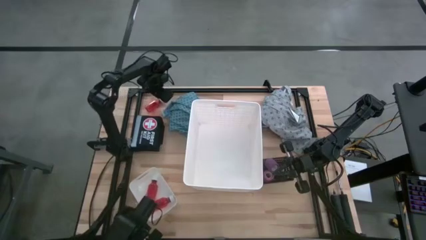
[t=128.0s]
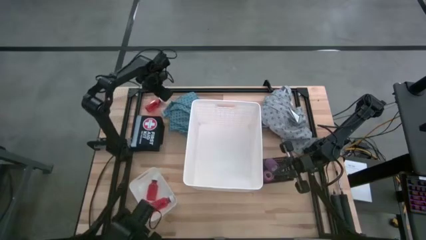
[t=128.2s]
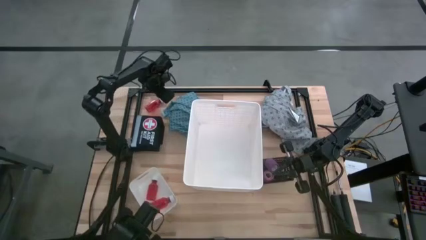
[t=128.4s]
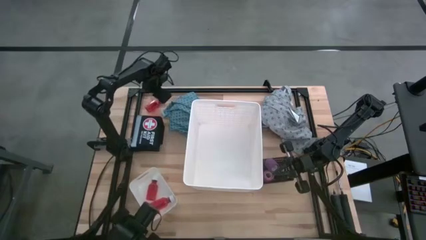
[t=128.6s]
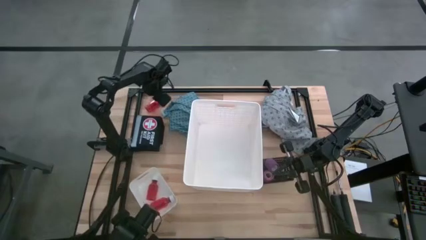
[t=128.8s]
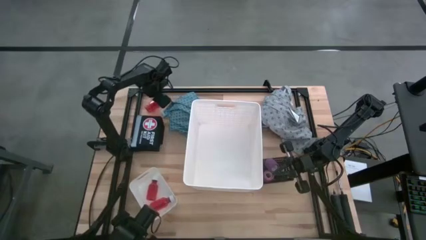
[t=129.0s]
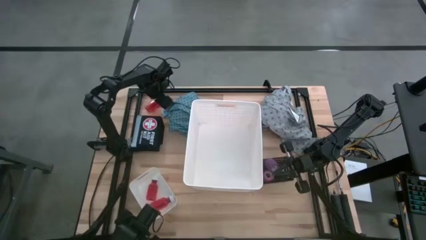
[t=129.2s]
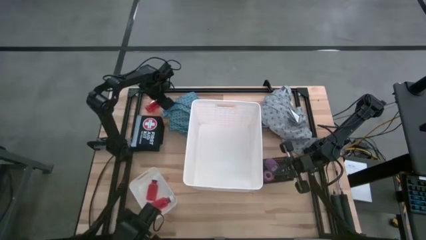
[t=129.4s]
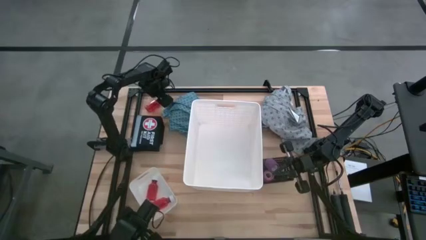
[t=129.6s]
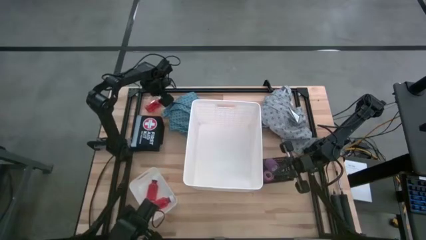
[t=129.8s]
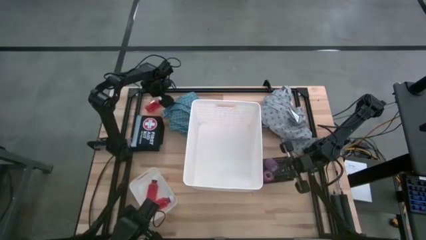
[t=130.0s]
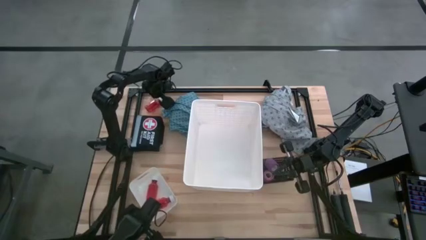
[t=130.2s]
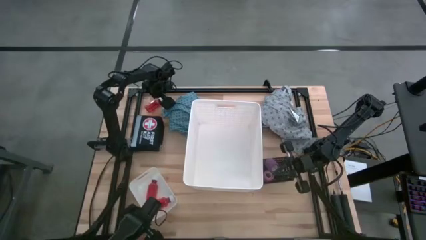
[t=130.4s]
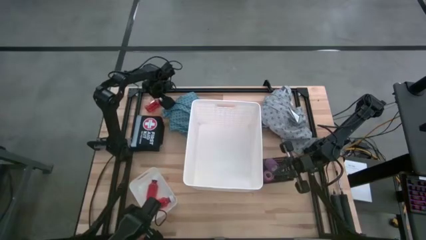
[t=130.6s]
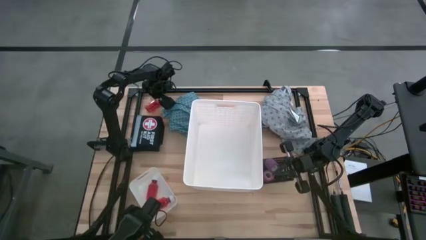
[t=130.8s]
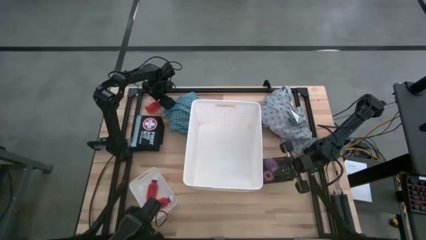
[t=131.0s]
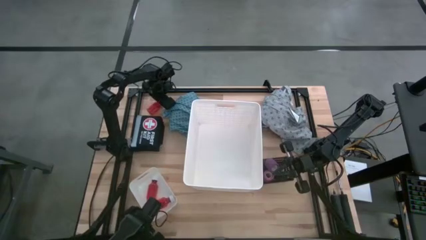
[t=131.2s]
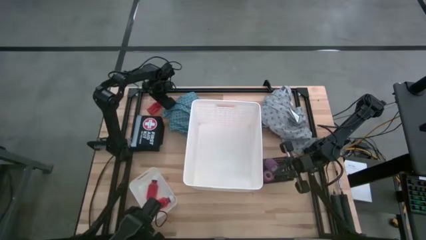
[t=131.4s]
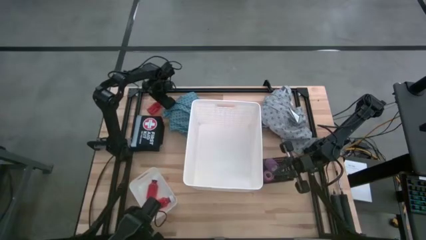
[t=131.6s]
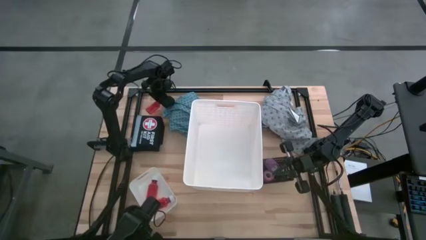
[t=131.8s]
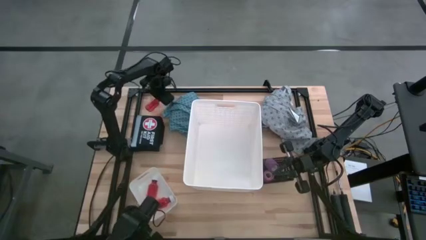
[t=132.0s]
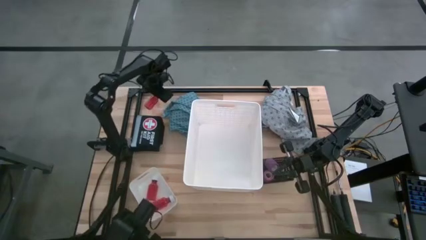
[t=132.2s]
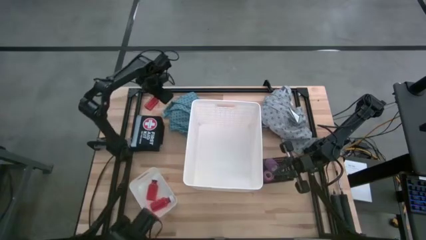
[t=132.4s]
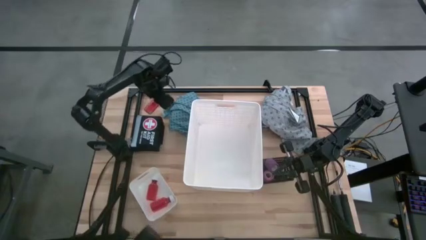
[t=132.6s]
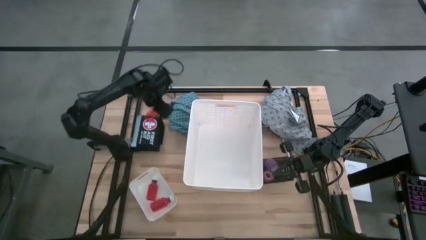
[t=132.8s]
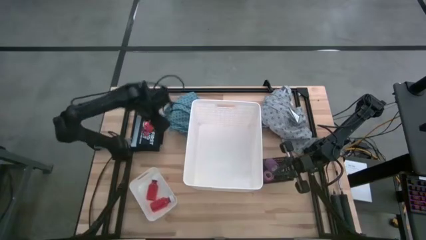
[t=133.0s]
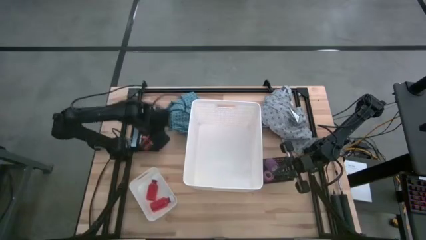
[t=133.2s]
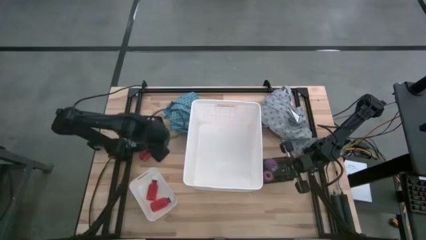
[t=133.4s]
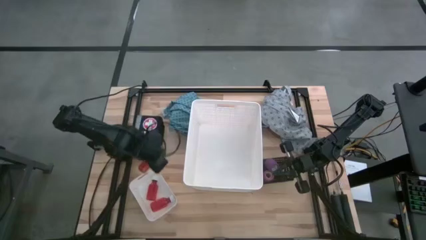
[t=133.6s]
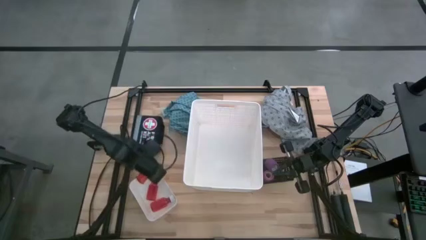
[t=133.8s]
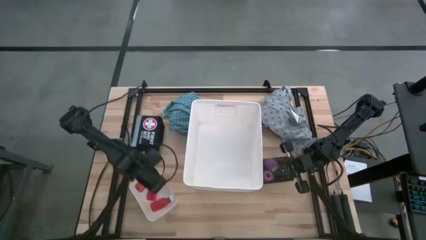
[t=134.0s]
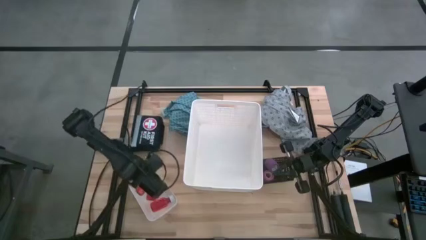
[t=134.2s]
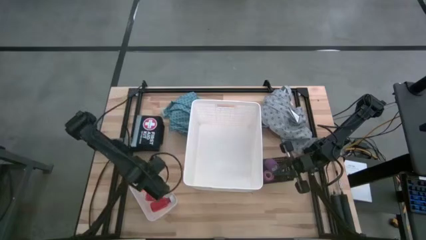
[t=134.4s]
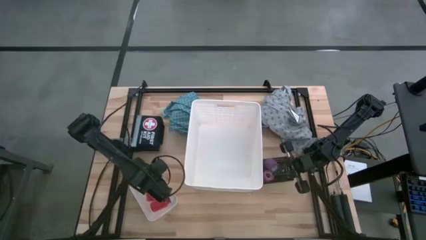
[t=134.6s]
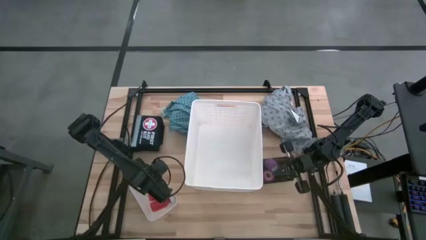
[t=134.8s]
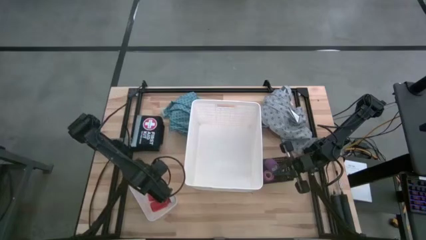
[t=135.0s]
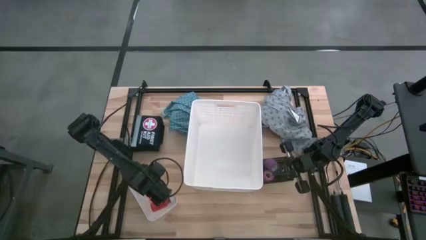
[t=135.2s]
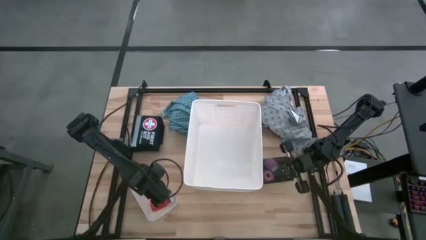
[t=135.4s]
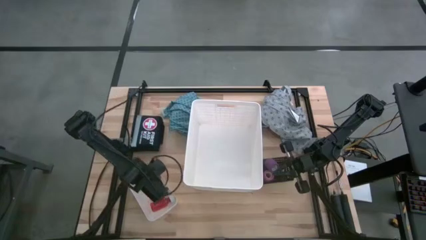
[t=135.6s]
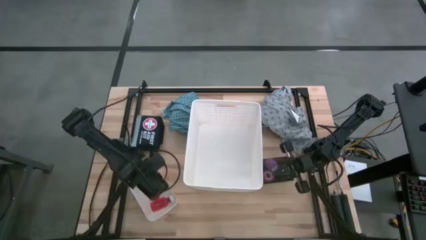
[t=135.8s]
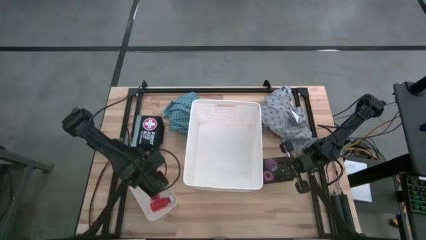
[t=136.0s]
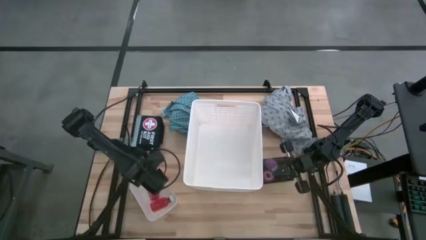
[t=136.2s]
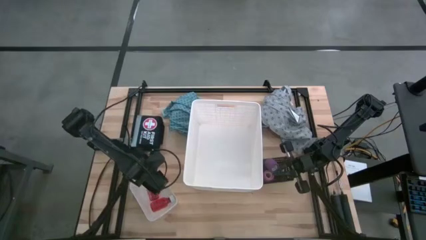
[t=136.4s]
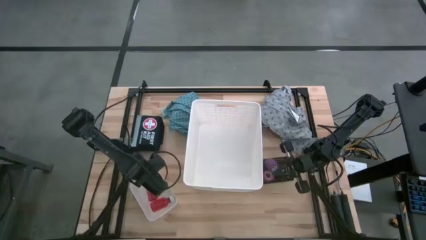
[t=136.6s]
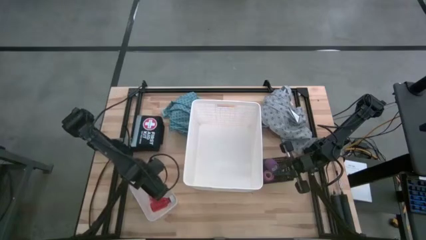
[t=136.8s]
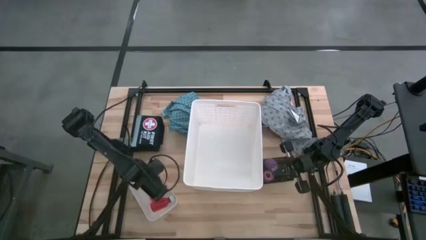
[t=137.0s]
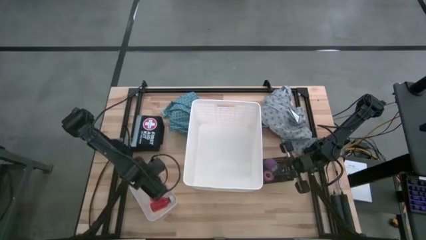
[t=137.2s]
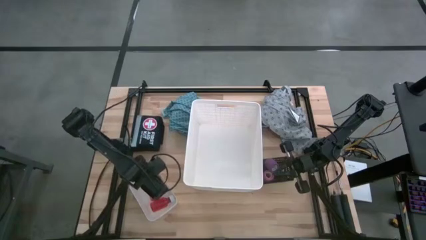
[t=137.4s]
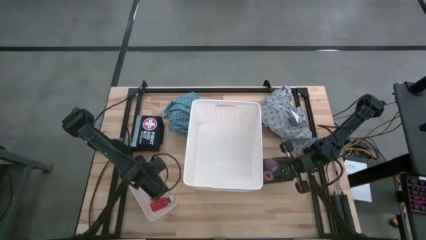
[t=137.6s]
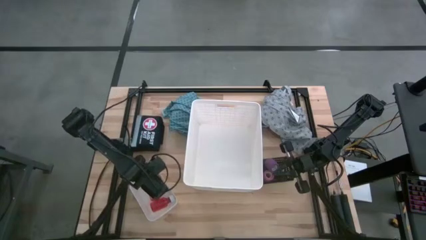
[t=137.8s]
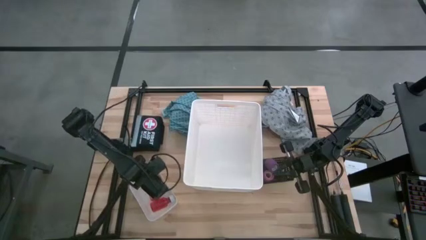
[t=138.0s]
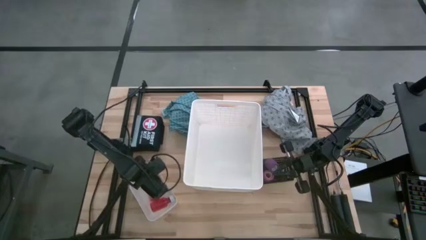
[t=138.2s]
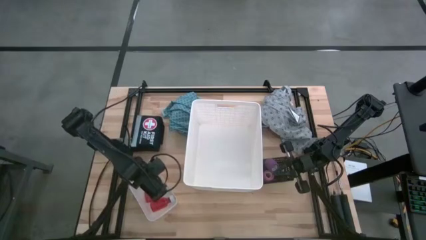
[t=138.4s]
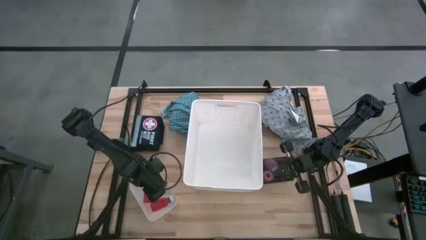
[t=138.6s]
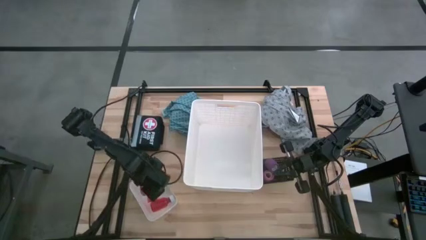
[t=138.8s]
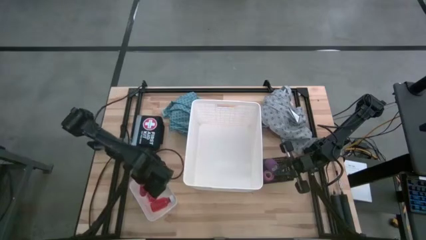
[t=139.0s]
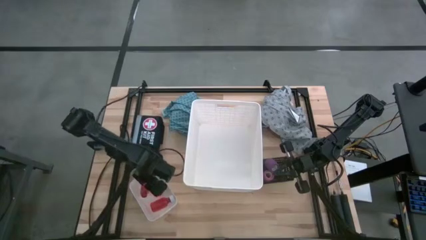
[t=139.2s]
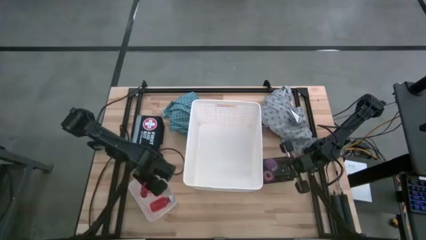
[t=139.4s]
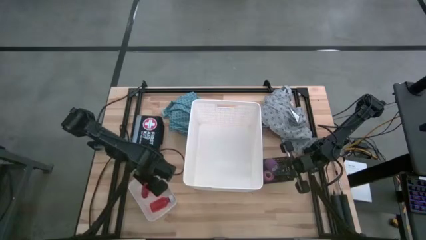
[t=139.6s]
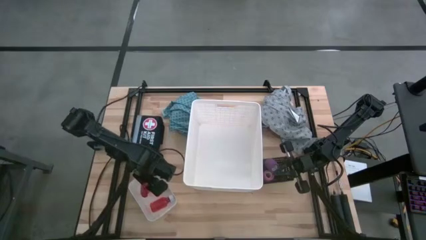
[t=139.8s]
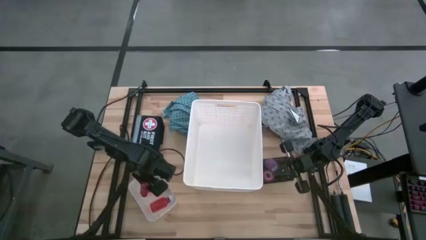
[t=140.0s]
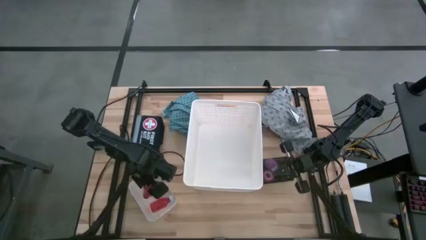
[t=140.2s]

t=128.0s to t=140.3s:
Task: Pick & place medical supplies in basket/bin
Put the orange bottle into the white bin
